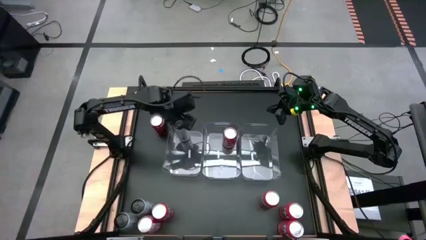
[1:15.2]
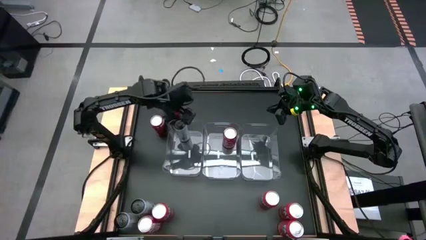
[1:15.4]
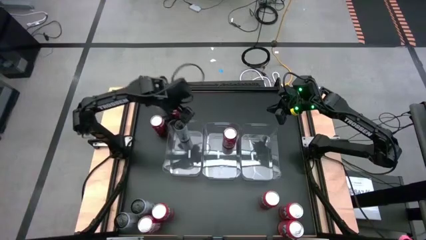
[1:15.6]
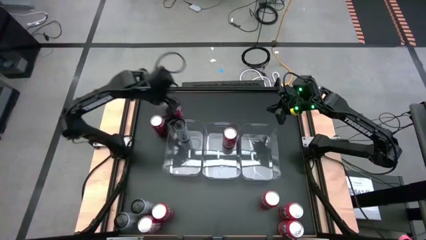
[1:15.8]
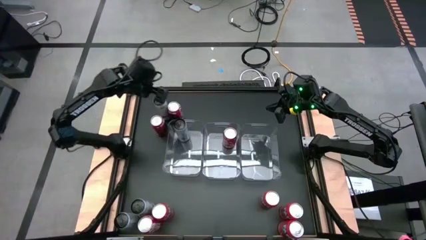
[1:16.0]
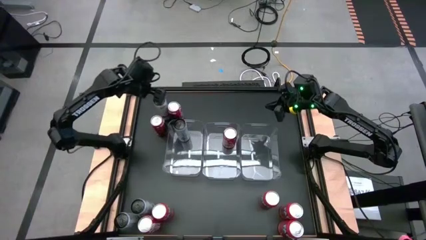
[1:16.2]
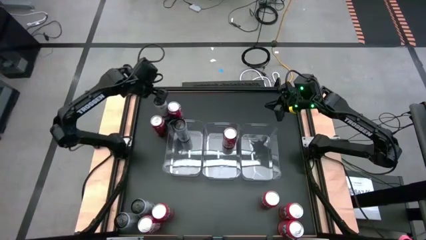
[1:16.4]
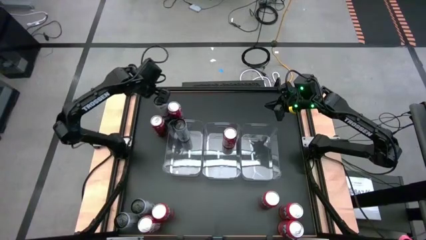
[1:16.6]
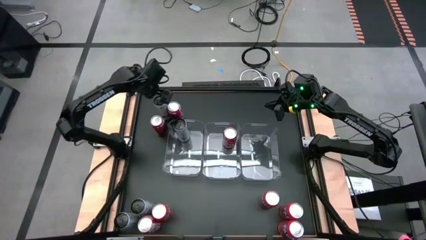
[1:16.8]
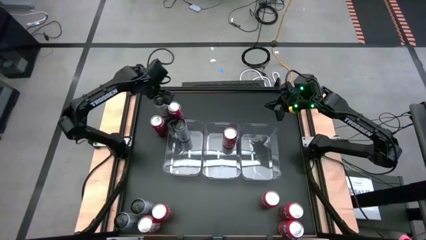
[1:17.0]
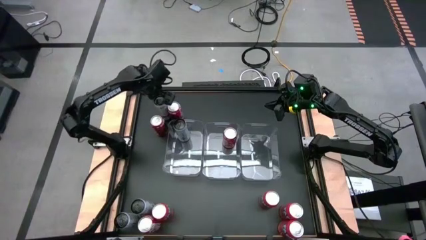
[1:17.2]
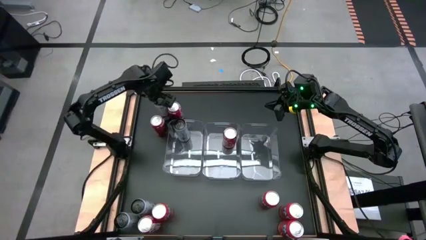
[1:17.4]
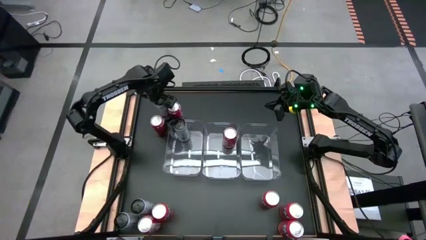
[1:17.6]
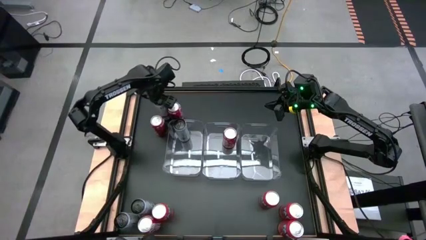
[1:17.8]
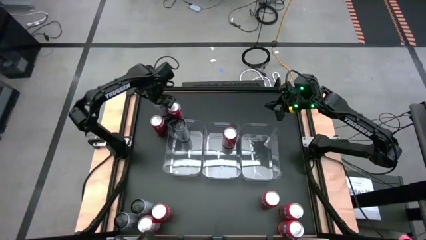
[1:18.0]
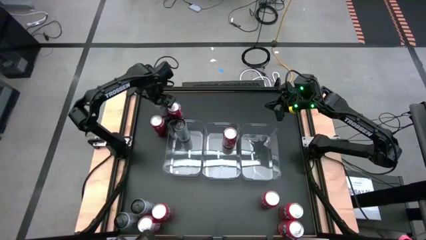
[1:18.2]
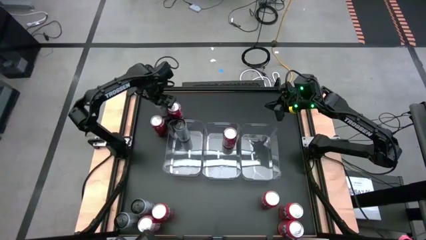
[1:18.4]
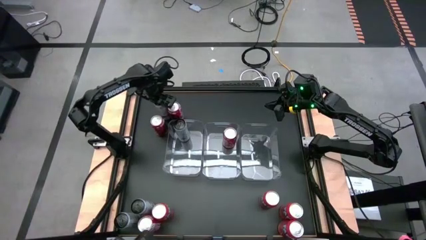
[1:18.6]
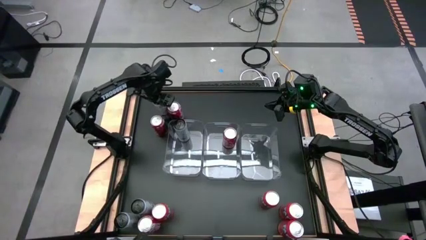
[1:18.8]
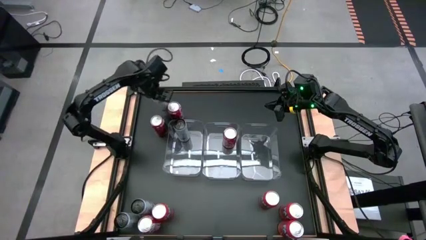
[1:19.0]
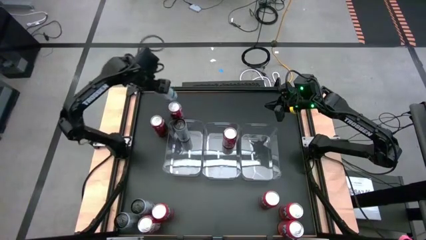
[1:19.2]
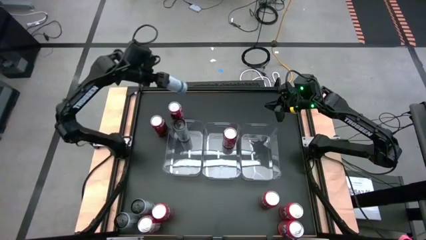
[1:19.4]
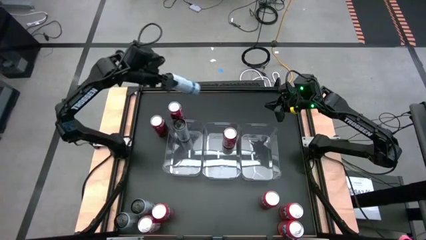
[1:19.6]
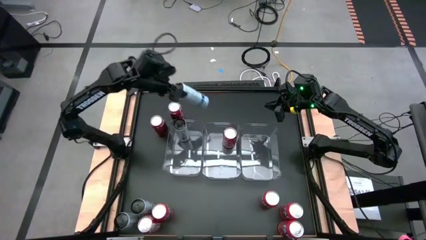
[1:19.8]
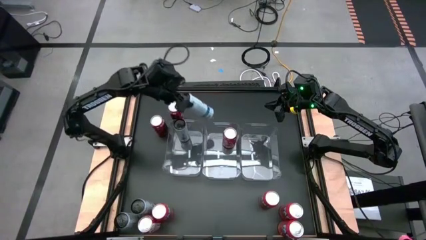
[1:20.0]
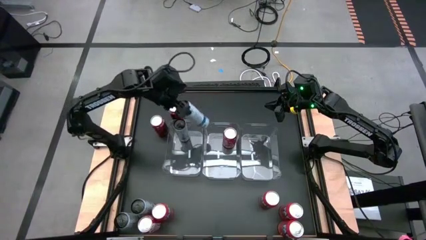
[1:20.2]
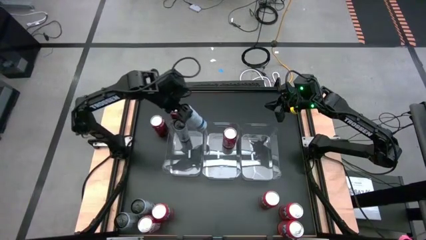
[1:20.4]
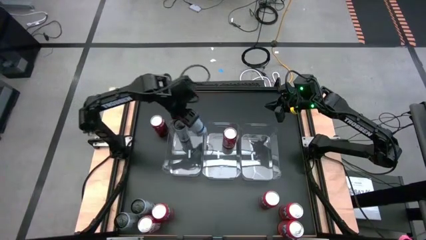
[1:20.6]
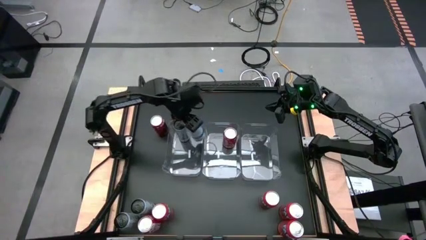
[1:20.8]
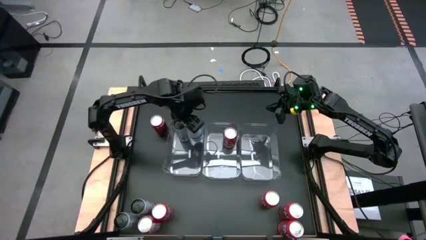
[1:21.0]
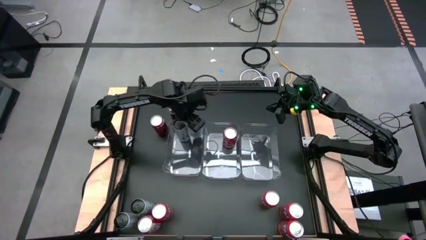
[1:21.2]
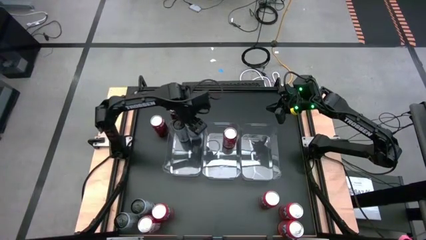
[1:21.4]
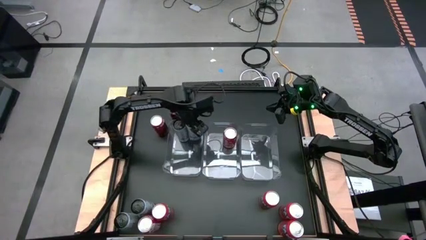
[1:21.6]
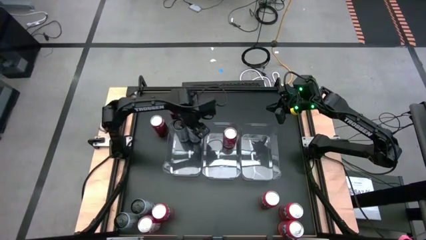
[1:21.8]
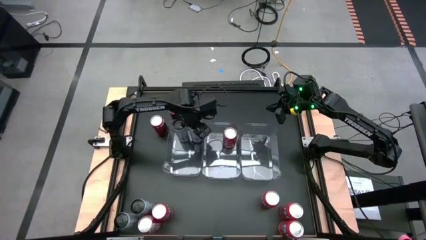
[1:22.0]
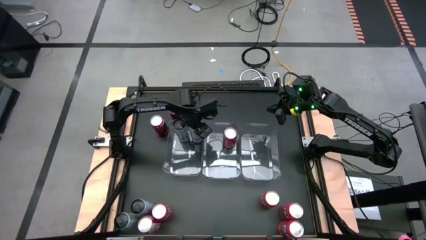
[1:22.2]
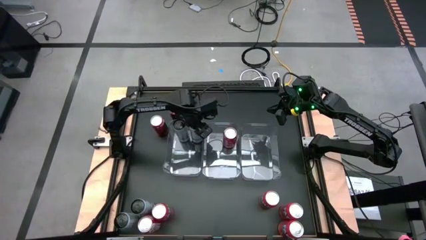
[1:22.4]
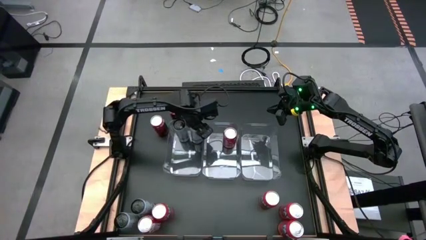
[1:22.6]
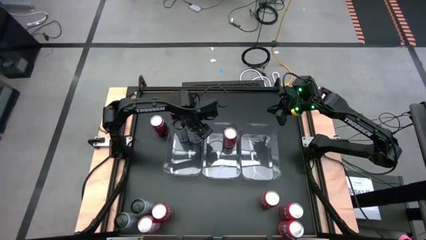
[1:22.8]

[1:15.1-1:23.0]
Task: Sort soda cans
Put the white-blue soda can into the left transparent bin

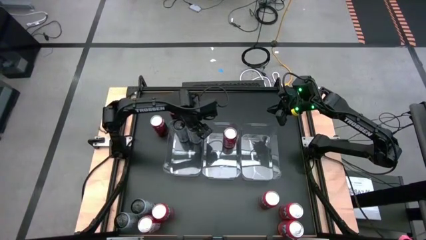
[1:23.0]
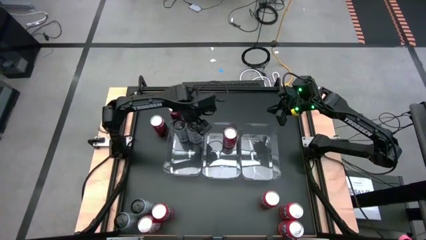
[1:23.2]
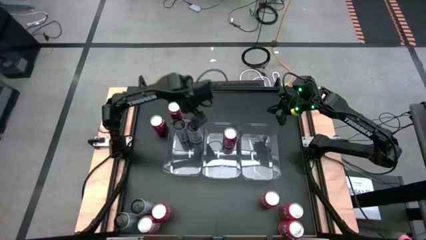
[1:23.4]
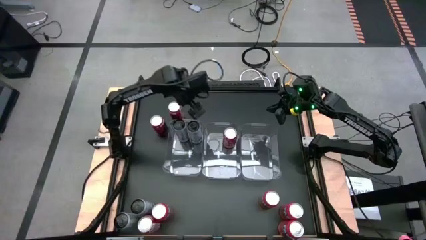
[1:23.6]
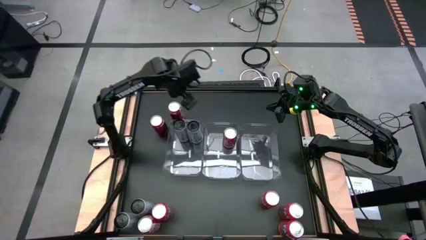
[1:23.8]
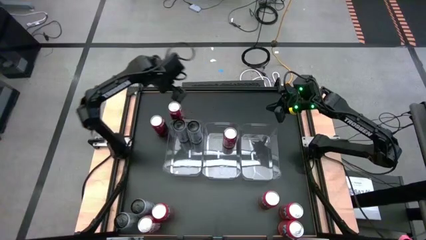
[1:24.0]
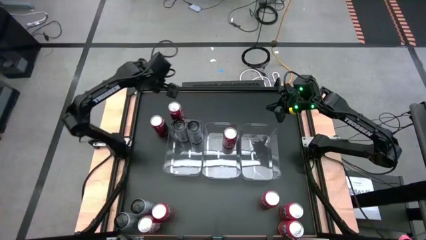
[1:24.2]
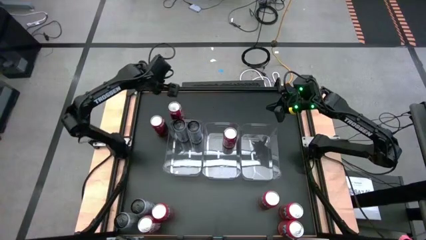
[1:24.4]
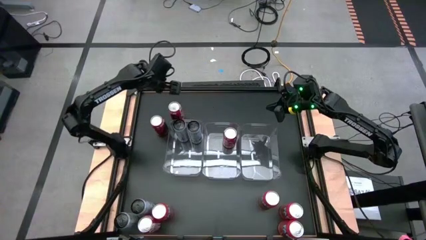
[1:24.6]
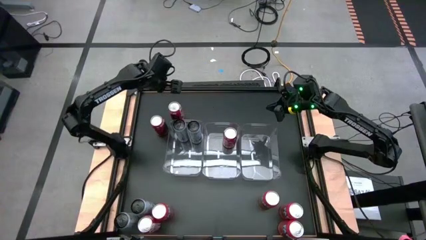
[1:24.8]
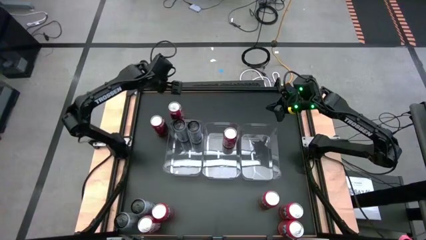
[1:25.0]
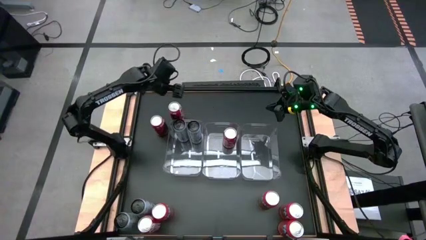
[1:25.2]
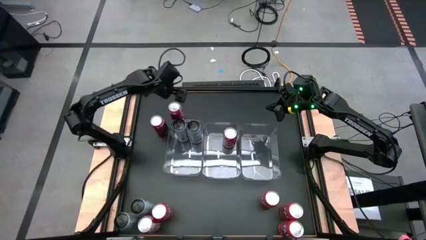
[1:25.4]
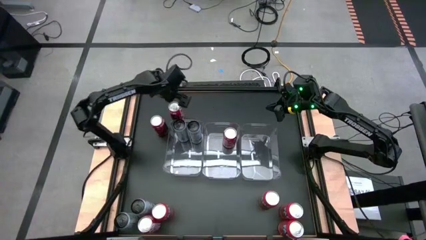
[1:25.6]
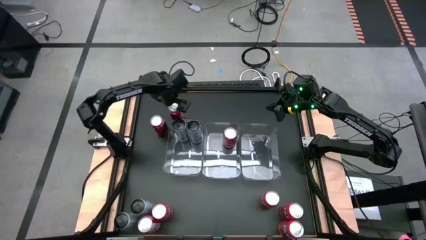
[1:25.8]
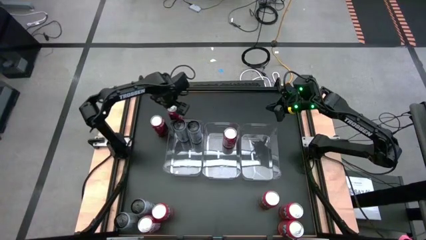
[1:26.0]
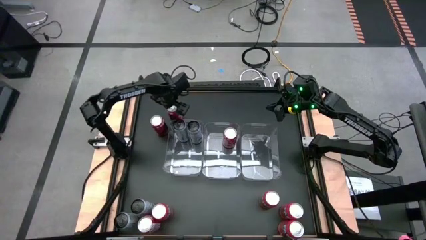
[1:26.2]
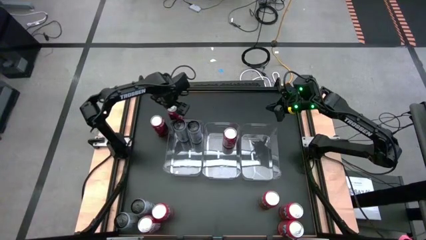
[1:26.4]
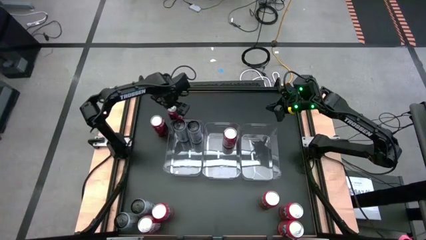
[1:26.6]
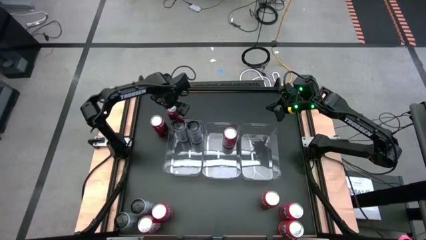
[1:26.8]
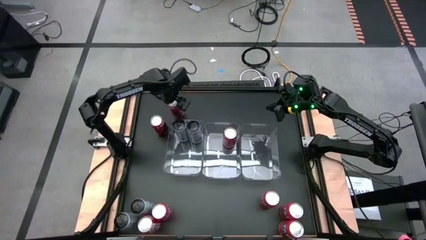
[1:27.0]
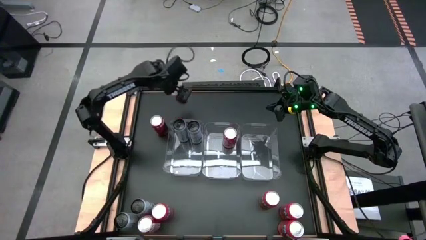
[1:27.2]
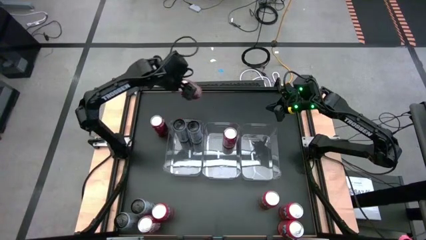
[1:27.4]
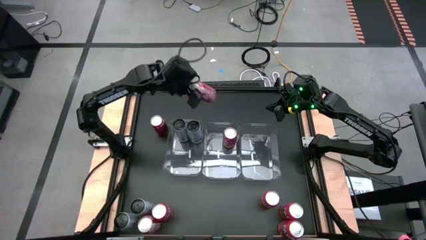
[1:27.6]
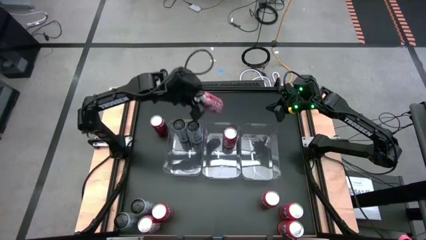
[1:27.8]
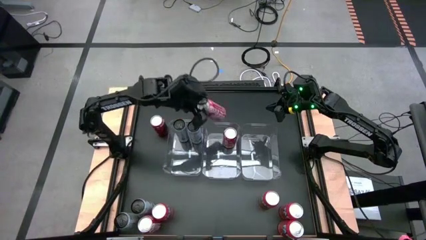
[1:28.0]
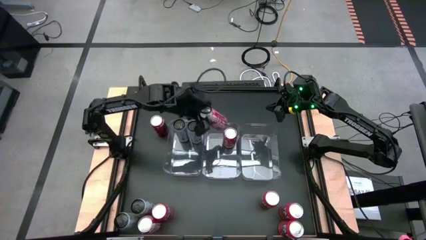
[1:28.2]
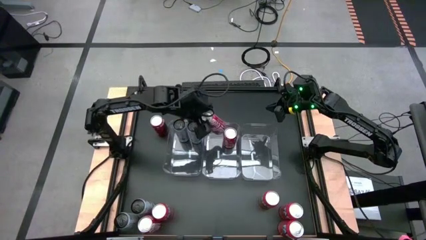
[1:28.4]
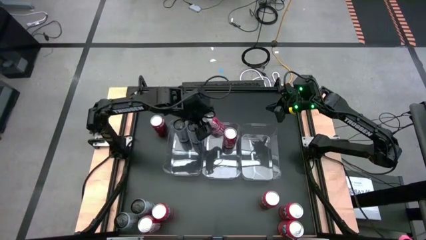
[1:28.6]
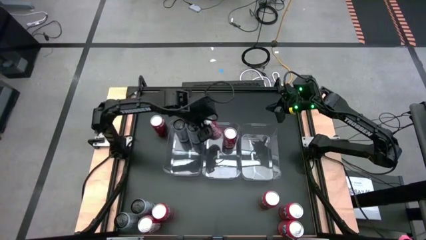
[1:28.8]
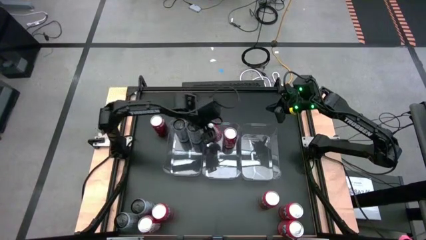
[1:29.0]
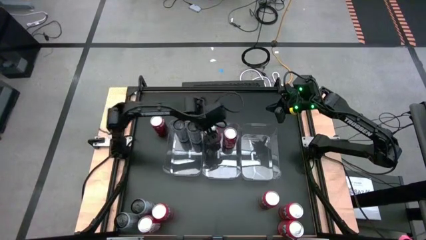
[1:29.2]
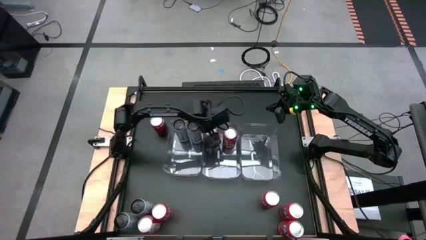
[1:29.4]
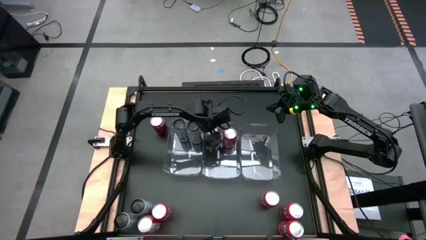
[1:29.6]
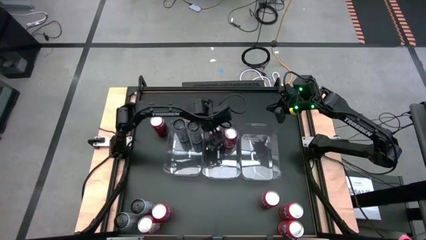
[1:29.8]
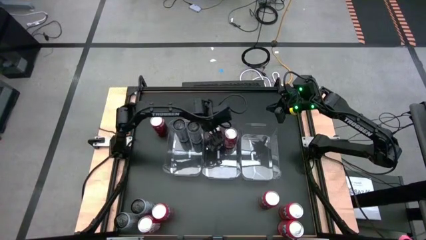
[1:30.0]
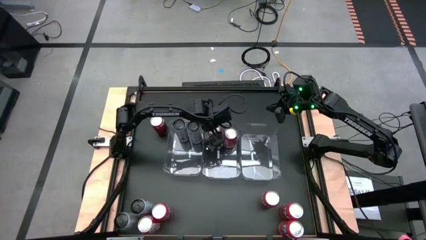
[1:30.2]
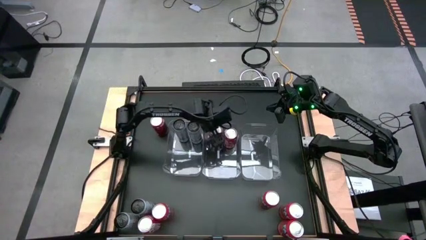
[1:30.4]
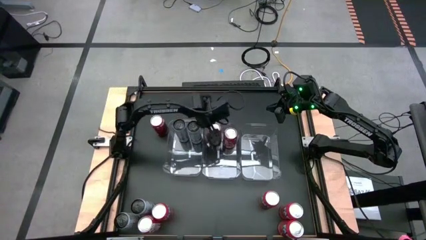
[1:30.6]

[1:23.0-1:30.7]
Put the red-white soda can into the center transparent bin
